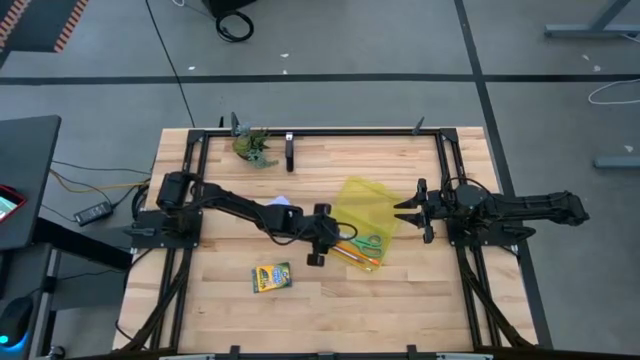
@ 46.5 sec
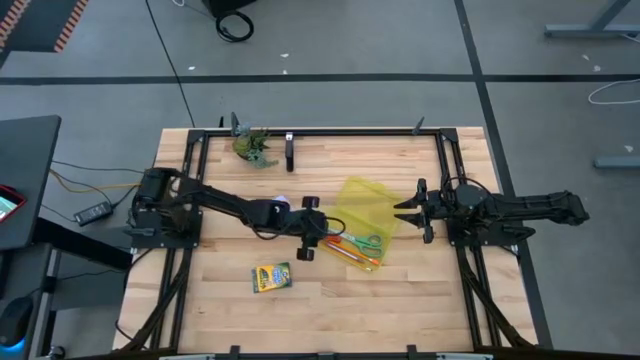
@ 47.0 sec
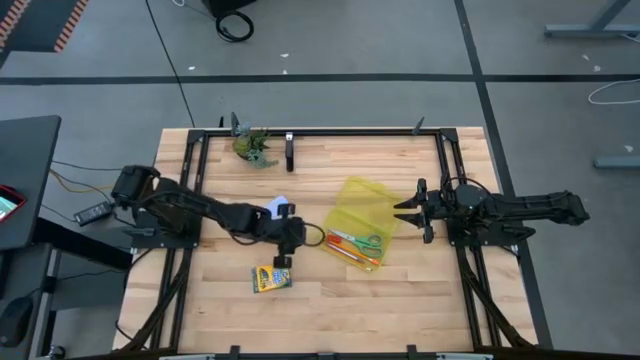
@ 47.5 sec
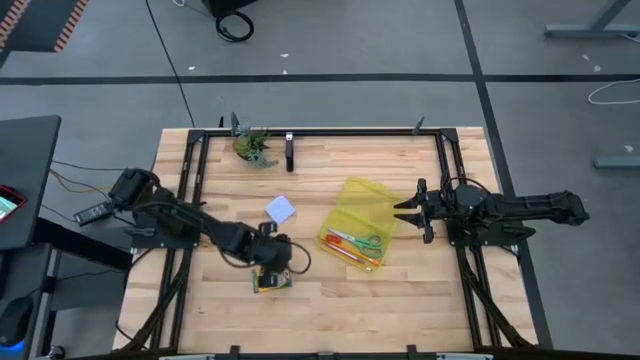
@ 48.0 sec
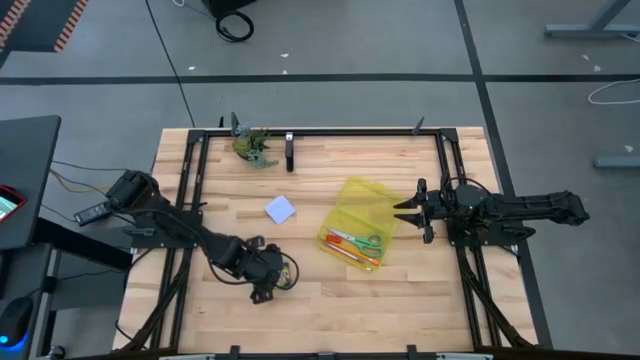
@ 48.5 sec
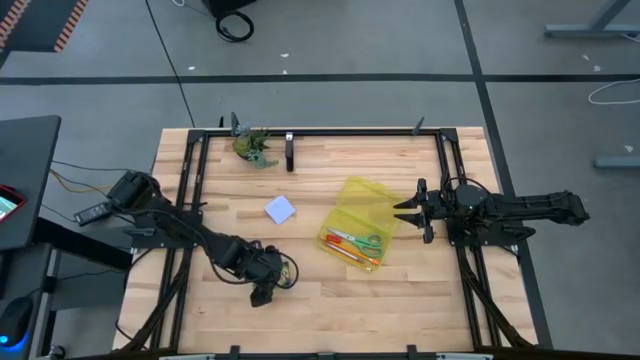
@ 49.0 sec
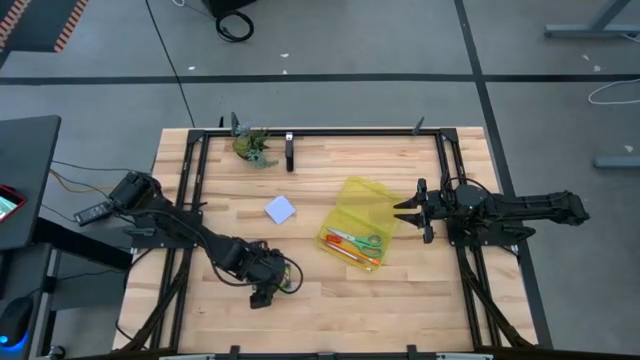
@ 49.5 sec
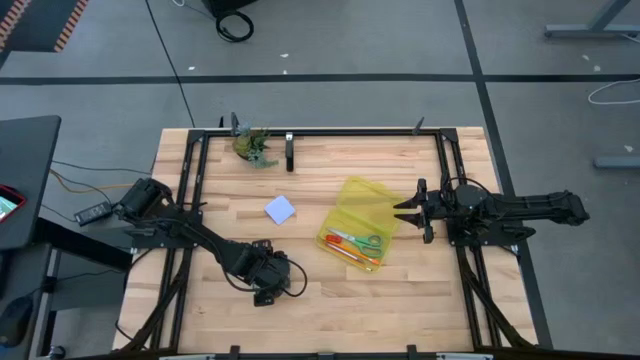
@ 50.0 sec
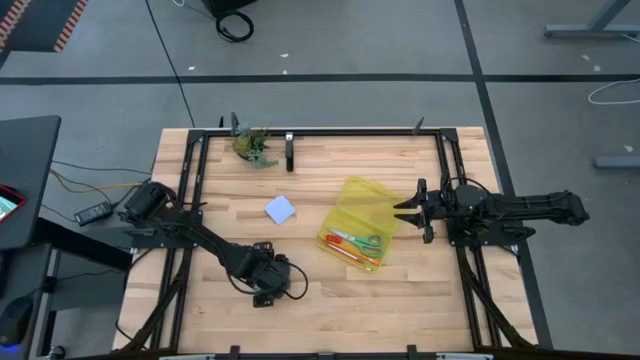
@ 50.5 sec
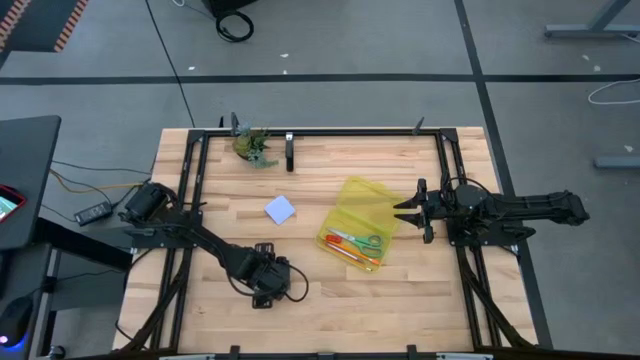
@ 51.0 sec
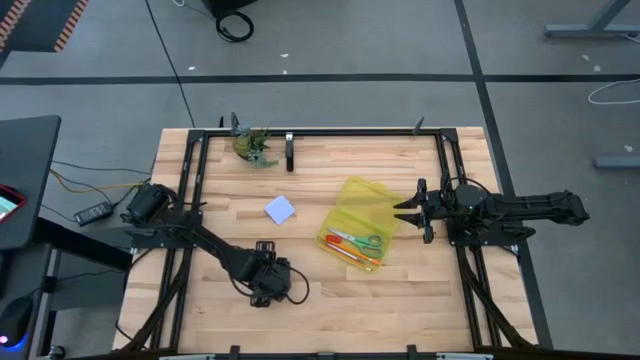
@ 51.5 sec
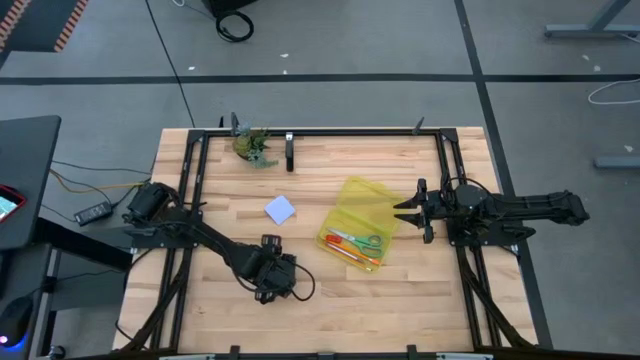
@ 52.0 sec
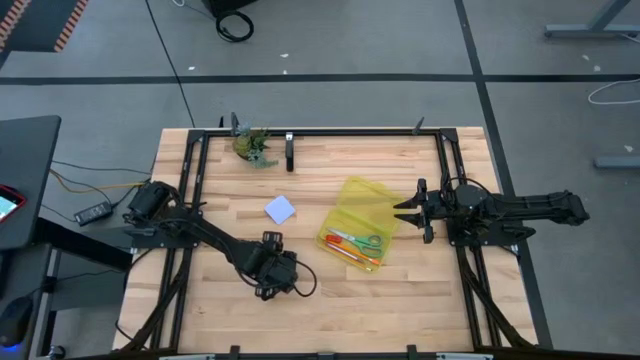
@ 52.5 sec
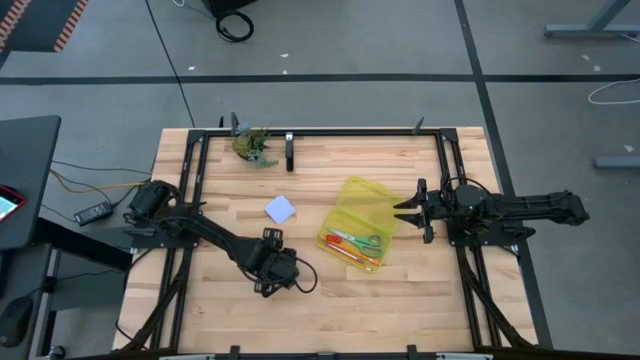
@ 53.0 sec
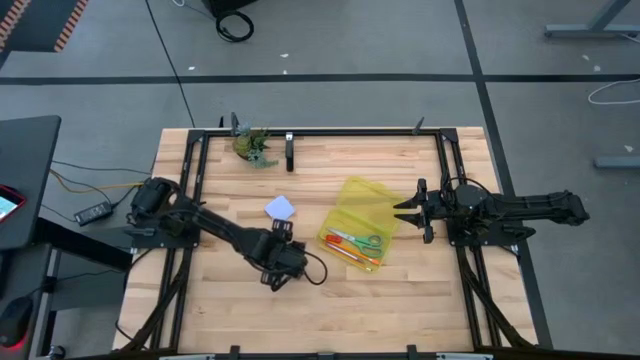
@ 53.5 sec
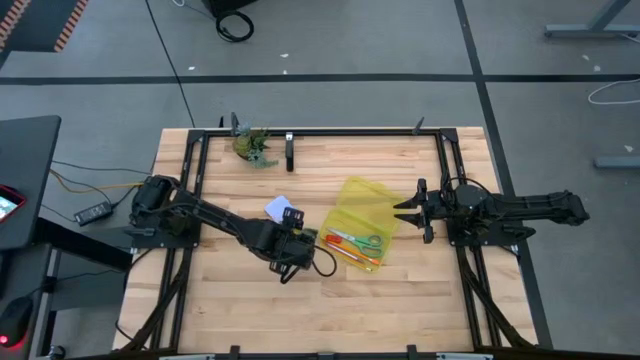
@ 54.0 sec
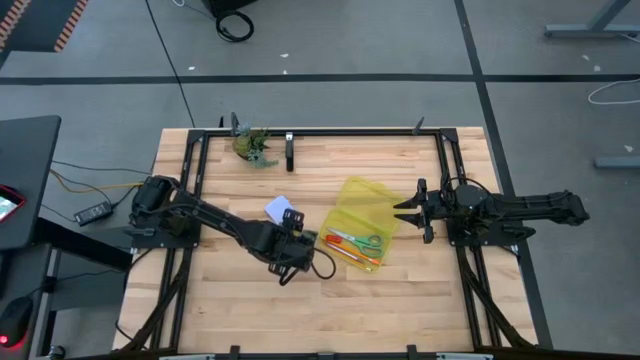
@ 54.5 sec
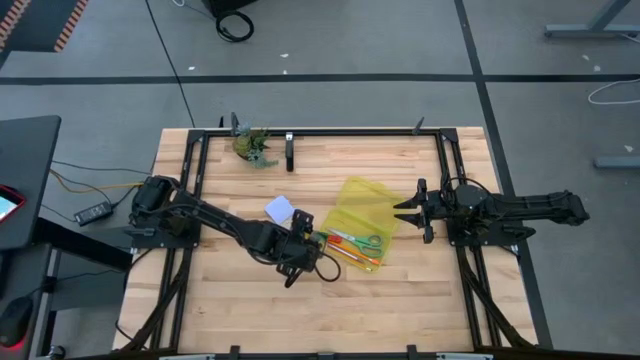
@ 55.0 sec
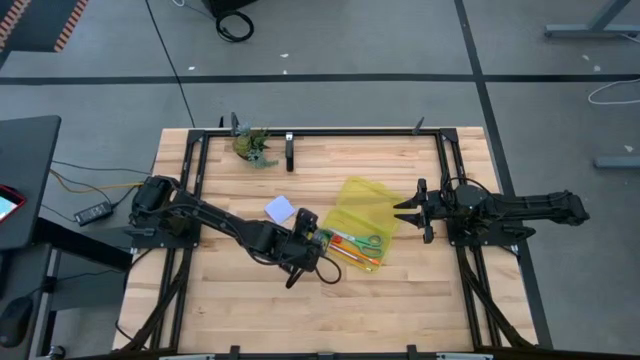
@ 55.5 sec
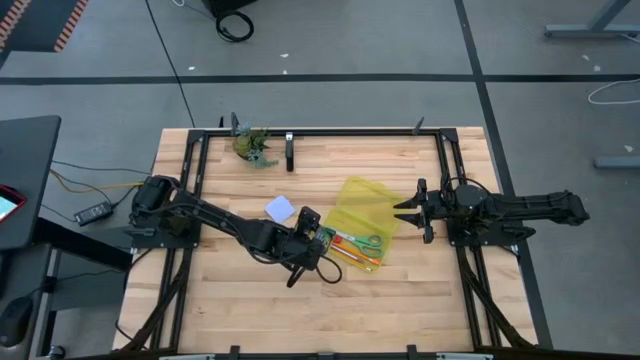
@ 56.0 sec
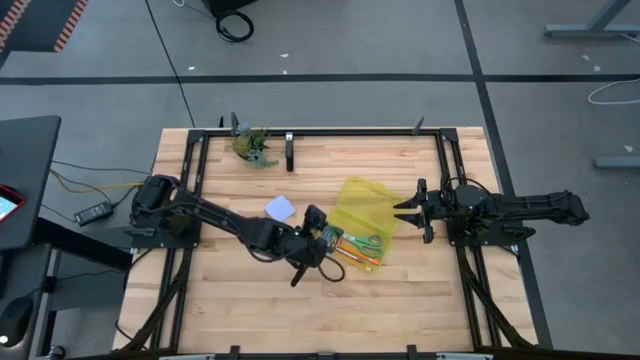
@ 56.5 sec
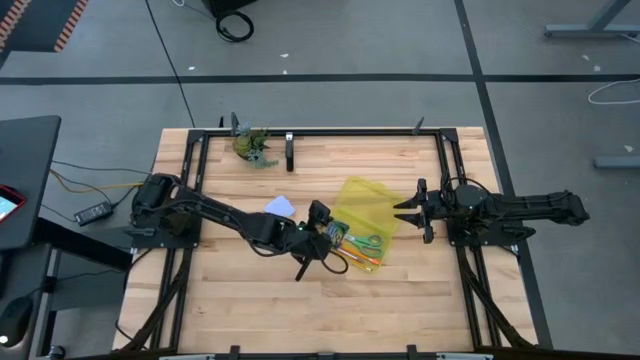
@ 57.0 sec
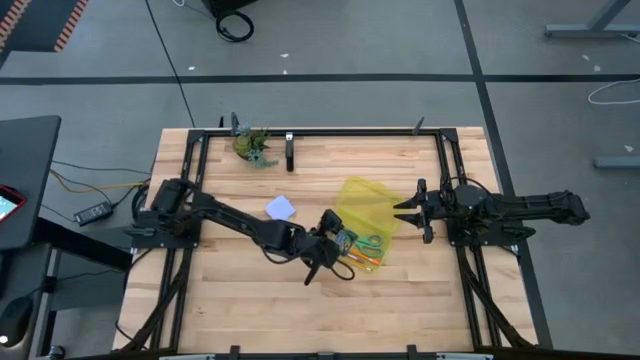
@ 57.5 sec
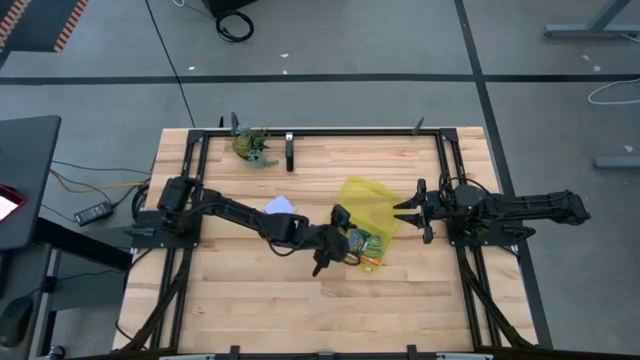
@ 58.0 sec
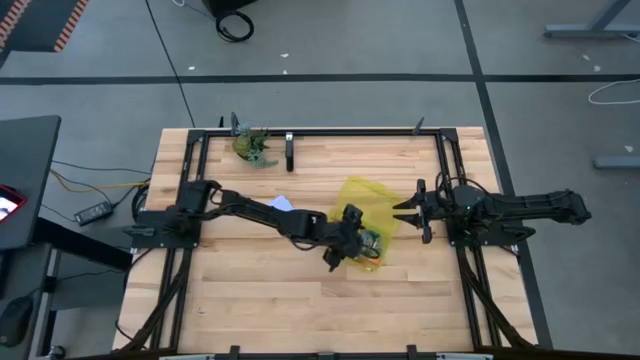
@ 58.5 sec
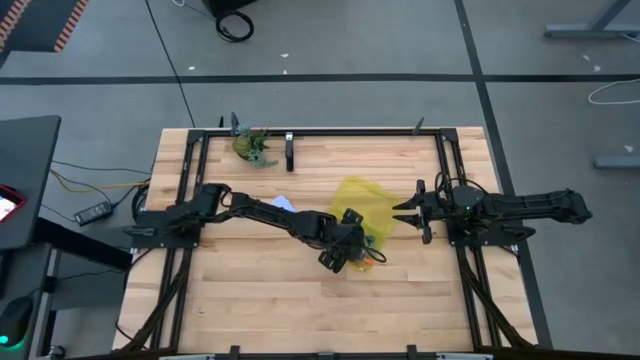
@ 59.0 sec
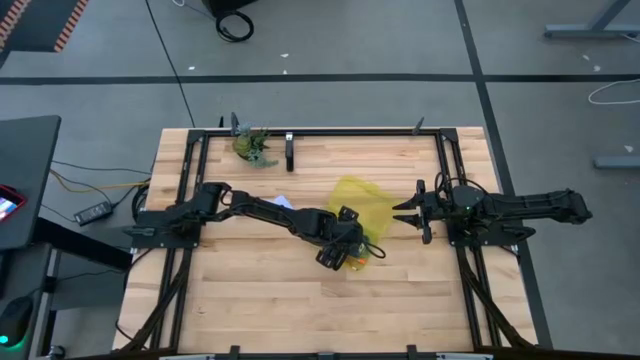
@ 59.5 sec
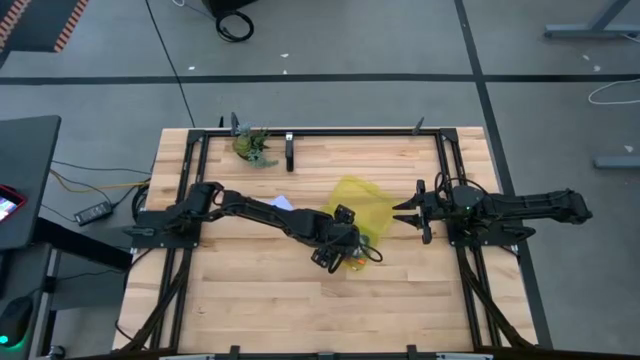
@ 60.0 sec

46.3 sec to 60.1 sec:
Task: Pack school essentials
Put the yellow crayon box into the yellow supply box

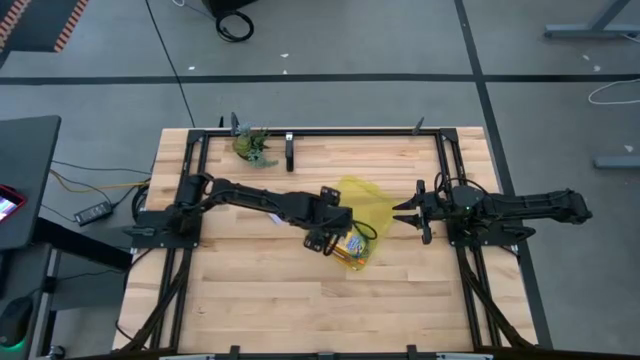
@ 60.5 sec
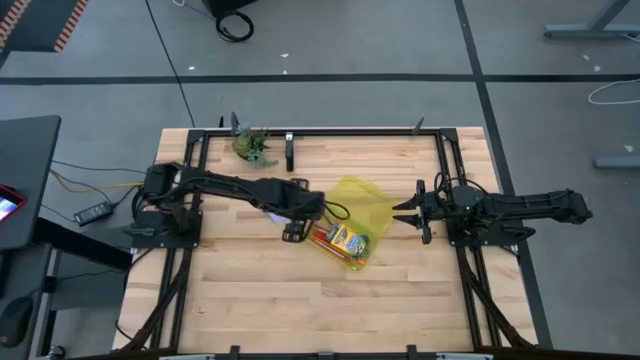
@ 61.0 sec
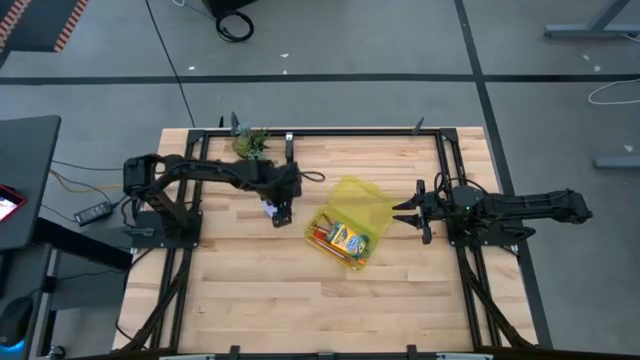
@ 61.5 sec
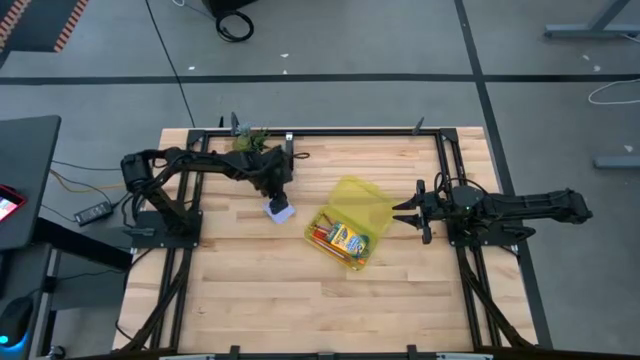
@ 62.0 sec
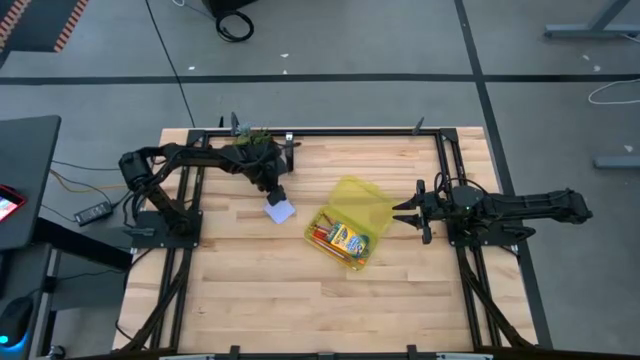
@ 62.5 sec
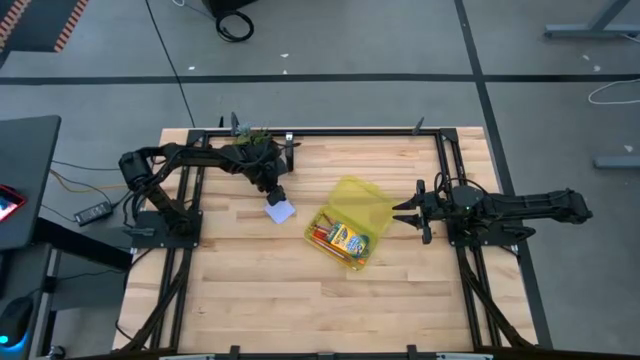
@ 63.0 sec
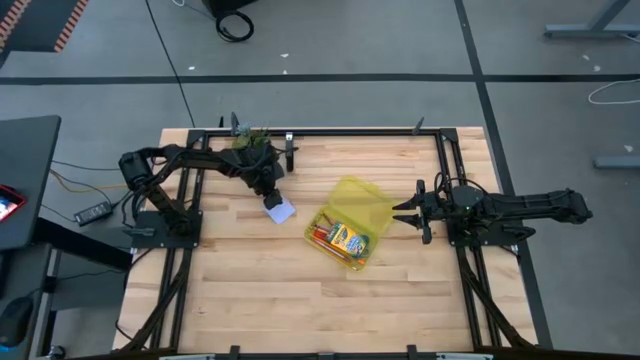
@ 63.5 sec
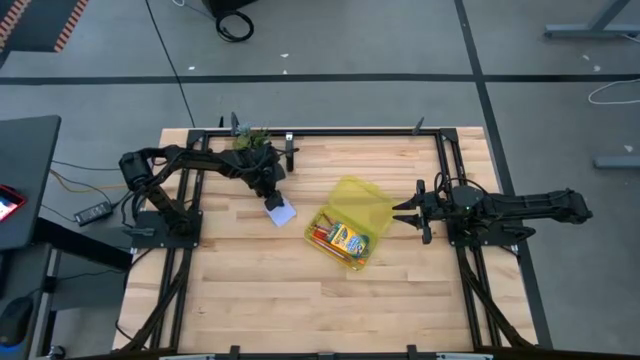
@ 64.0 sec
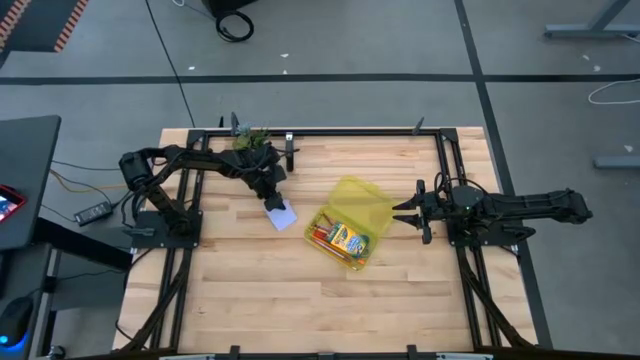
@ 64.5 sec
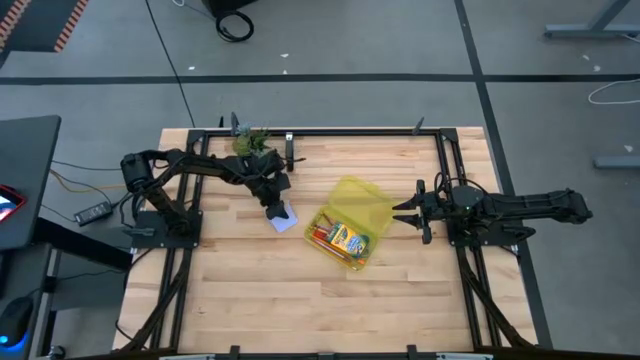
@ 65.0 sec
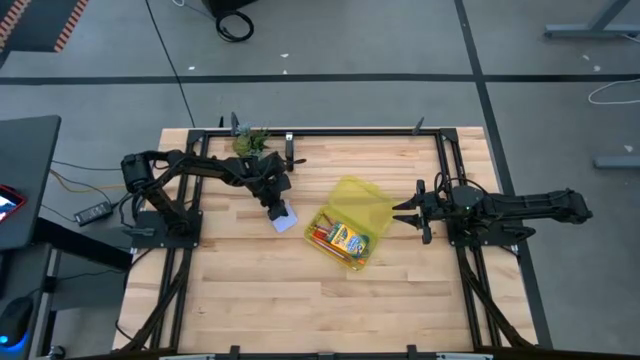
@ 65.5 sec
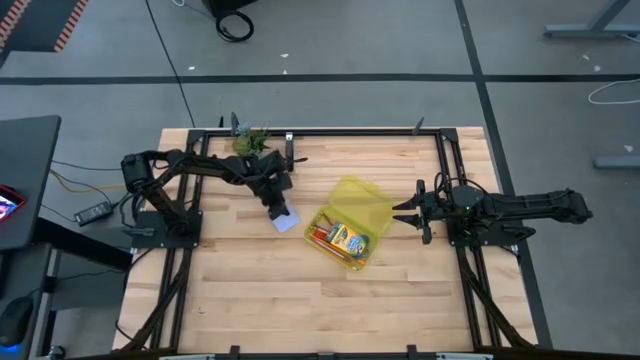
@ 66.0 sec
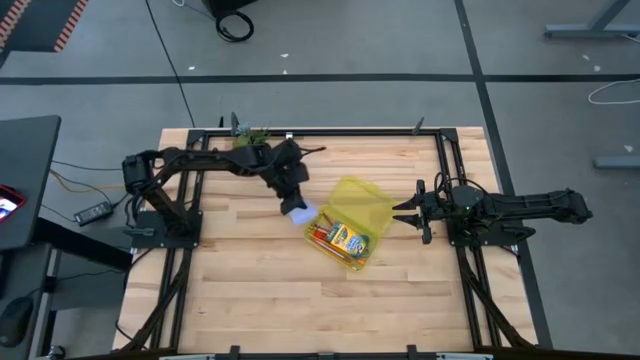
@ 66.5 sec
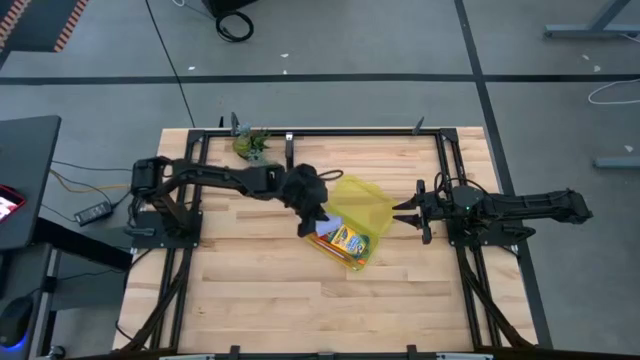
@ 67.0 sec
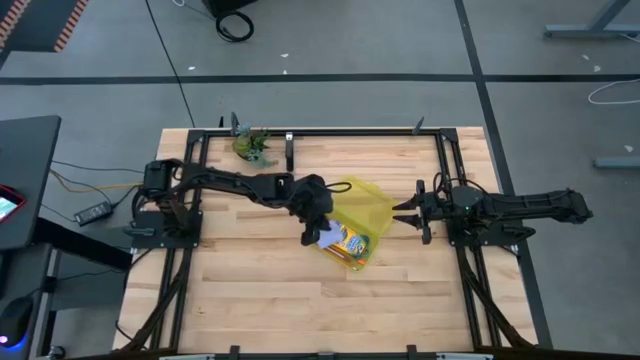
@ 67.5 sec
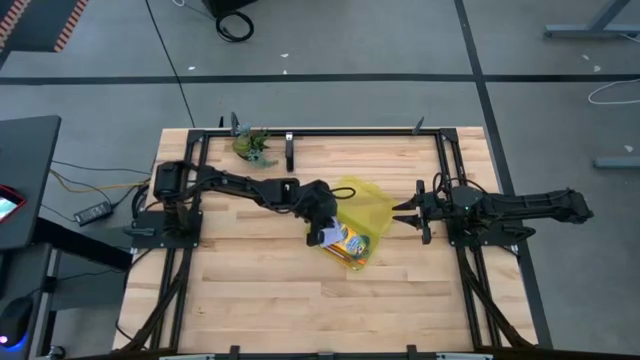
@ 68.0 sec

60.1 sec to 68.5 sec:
Put the white sticky notes into the yellow supply box
